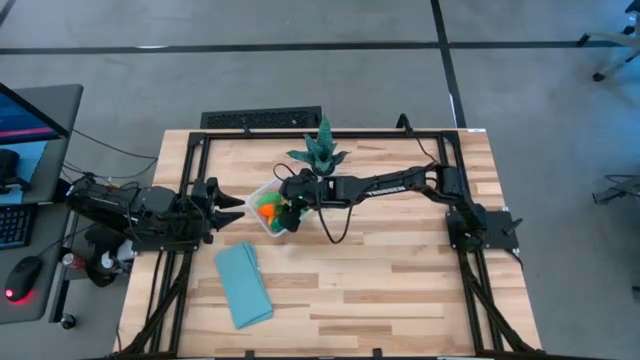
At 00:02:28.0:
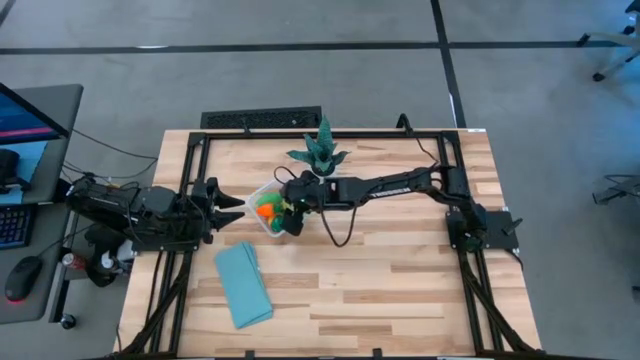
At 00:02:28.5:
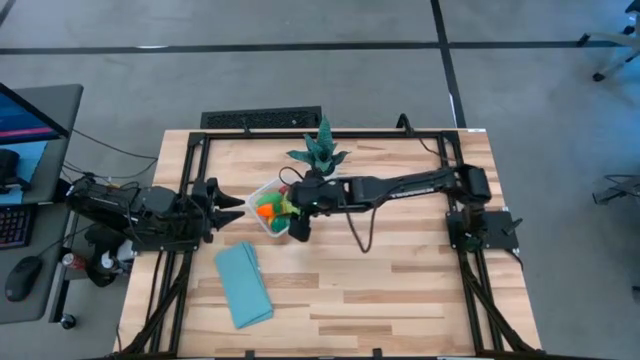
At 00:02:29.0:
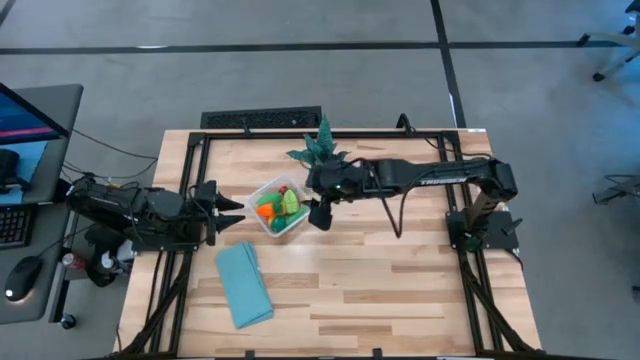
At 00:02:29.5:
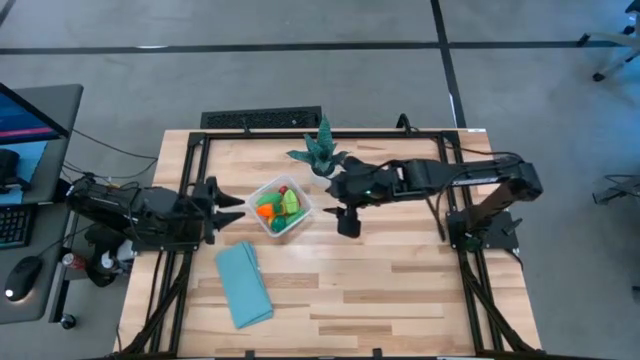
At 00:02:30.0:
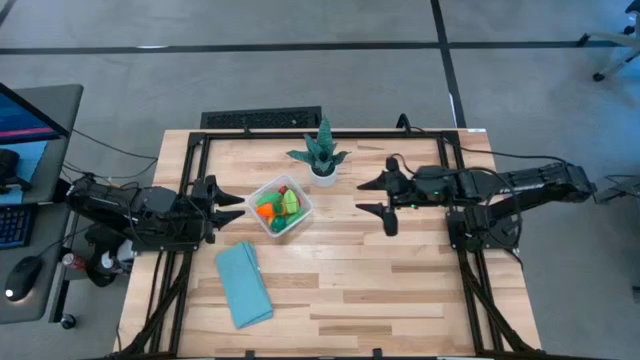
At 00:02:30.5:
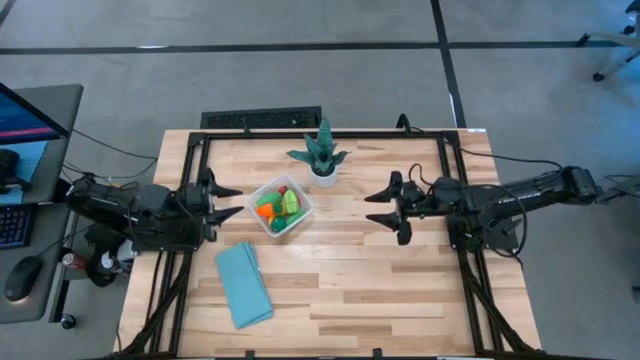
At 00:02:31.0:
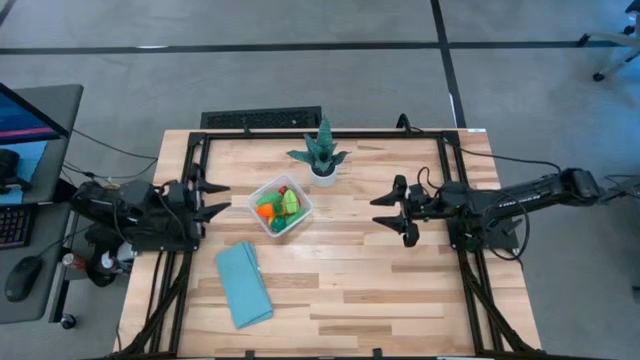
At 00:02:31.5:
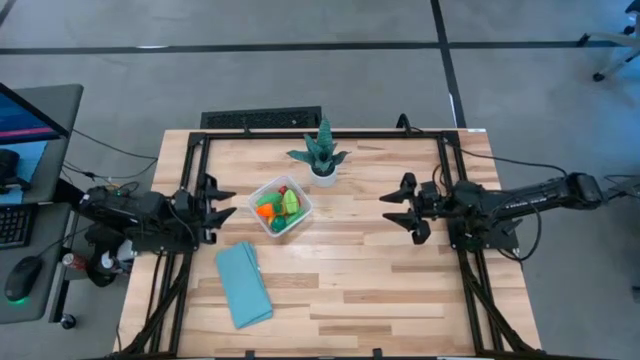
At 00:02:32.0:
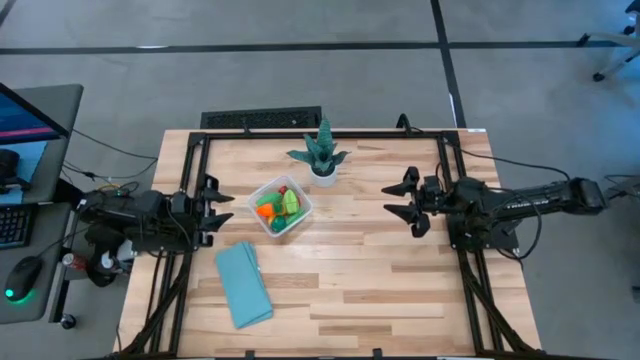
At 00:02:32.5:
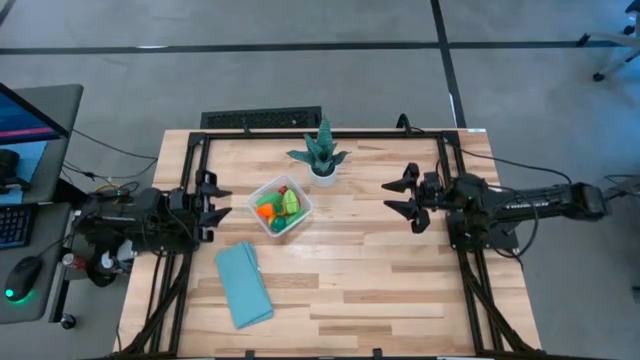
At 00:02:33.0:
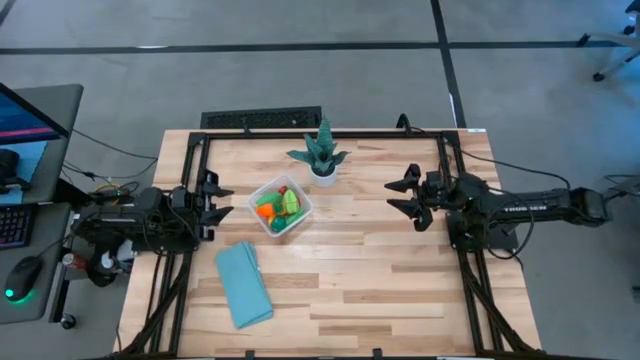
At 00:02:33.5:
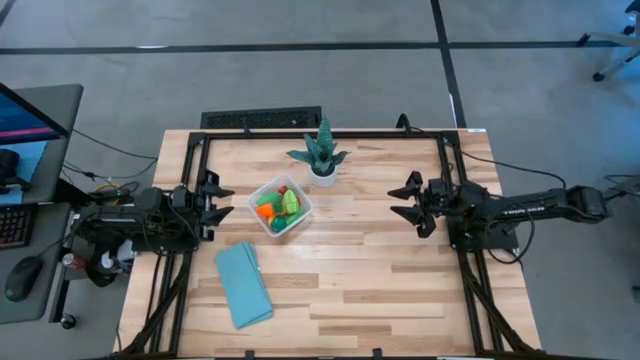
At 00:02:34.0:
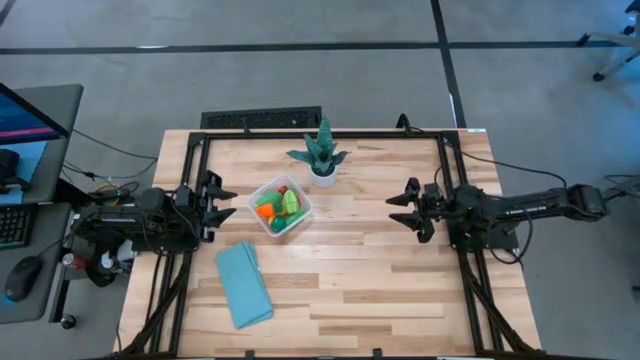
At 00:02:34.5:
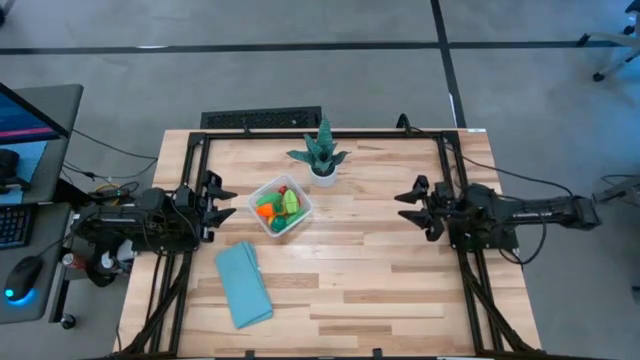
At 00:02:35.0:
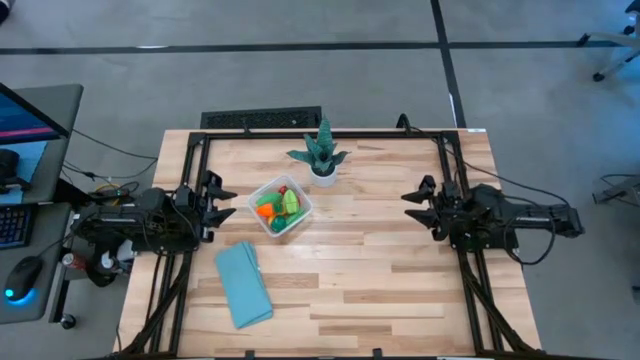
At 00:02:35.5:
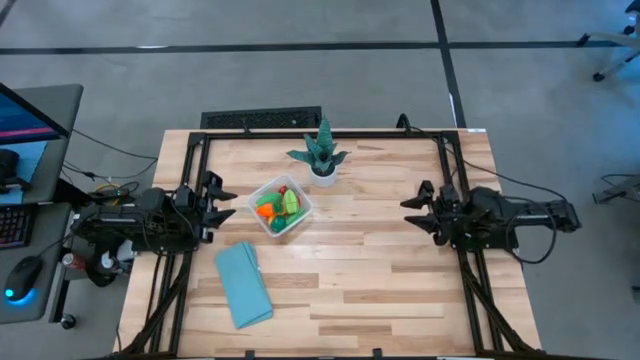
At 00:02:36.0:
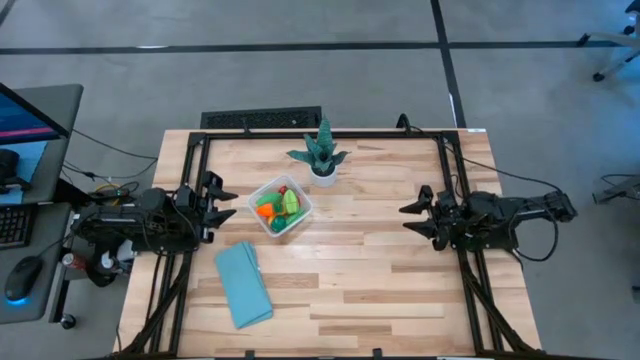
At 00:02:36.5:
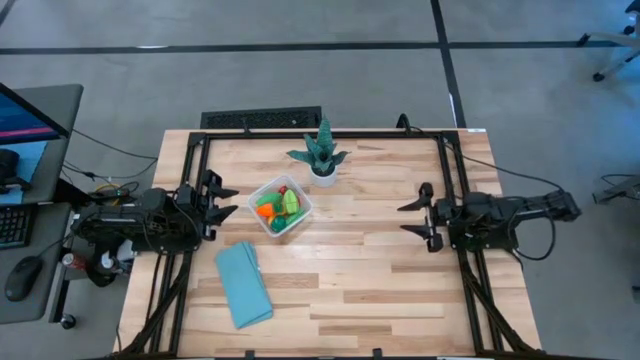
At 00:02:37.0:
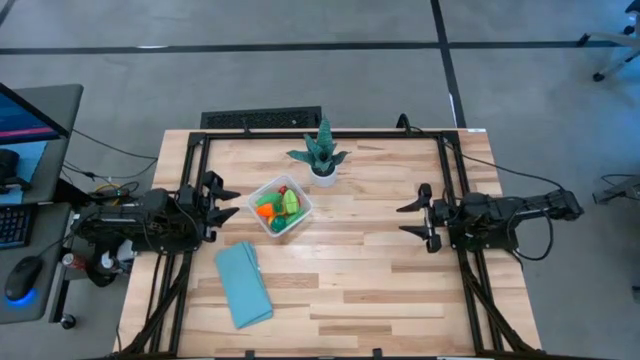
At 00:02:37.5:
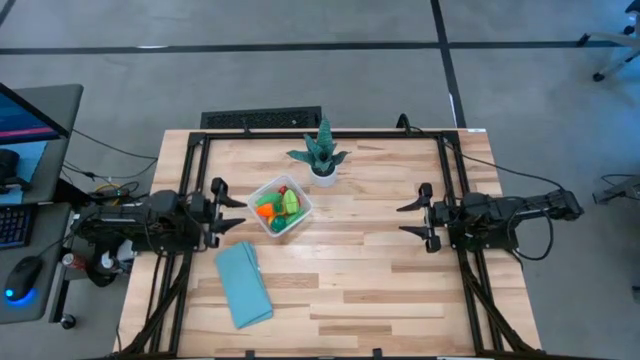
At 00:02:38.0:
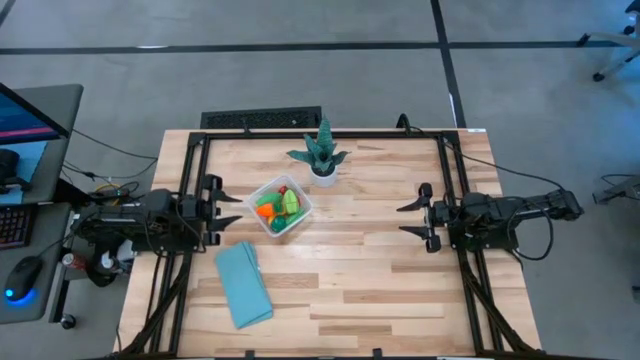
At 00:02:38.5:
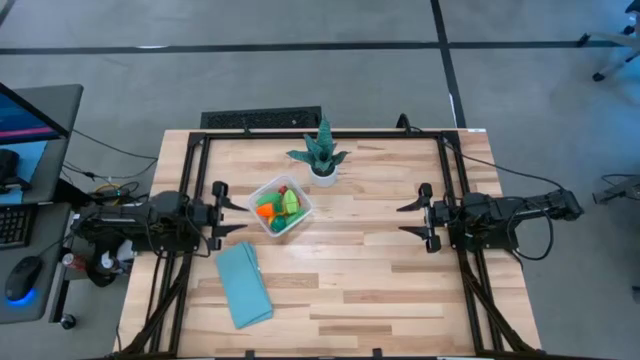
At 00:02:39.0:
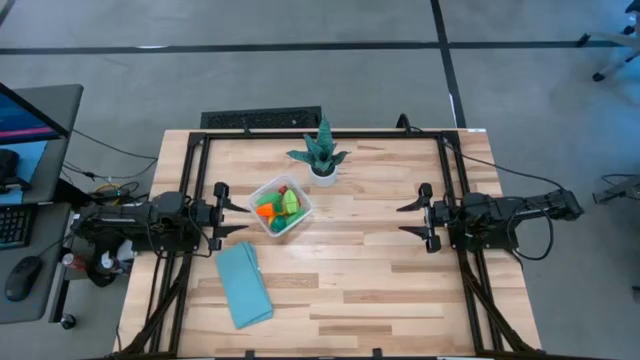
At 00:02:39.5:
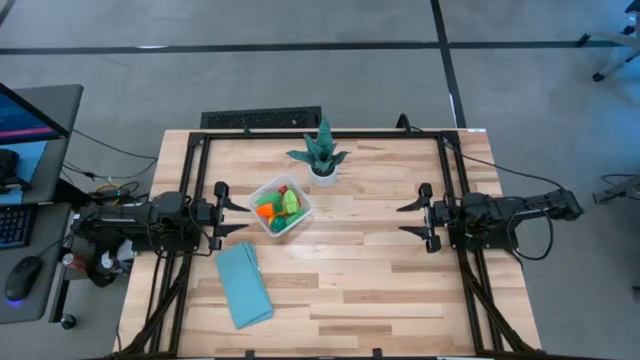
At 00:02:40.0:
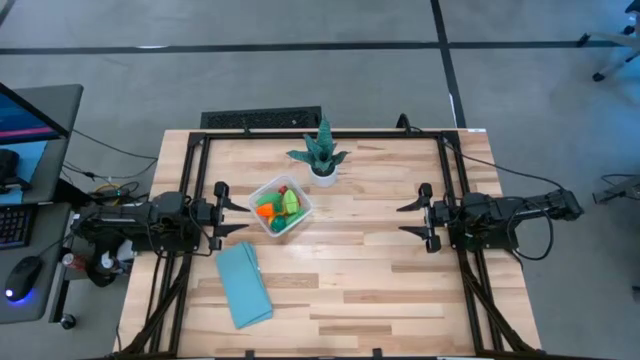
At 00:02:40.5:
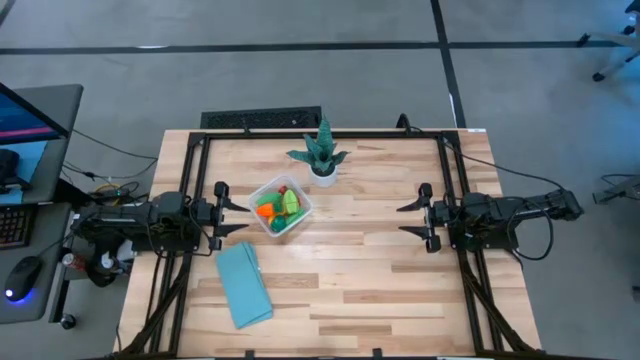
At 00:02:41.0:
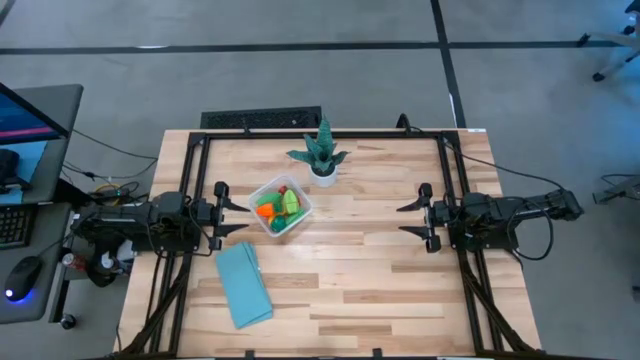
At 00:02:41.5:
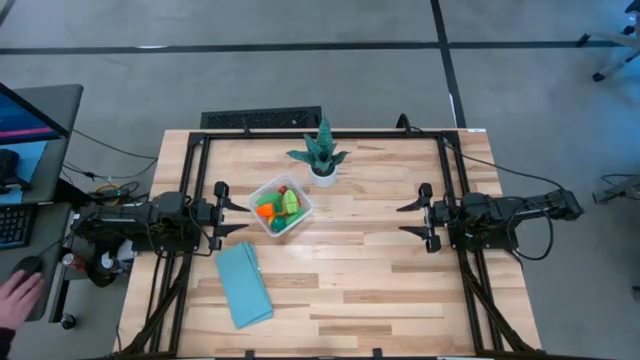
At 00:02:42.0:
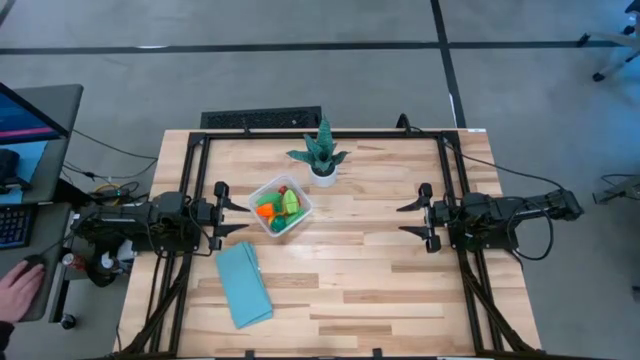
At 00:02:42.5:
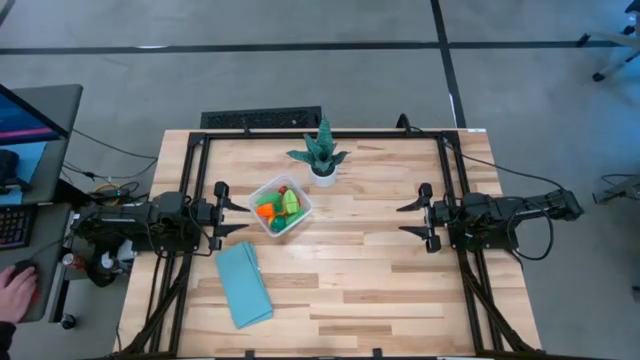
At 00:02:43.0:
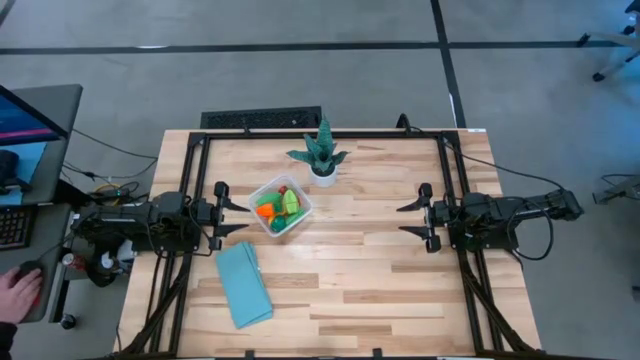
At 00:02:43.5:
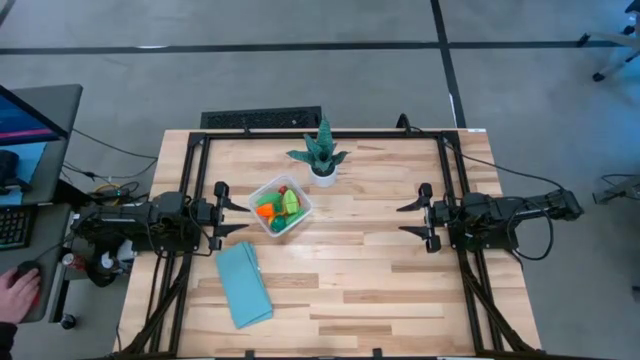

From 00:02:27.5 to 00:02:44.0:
Task: Pick and placing Produce into tupperware
Return to Home Position

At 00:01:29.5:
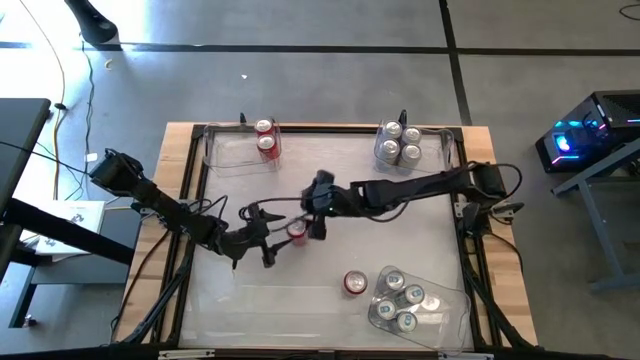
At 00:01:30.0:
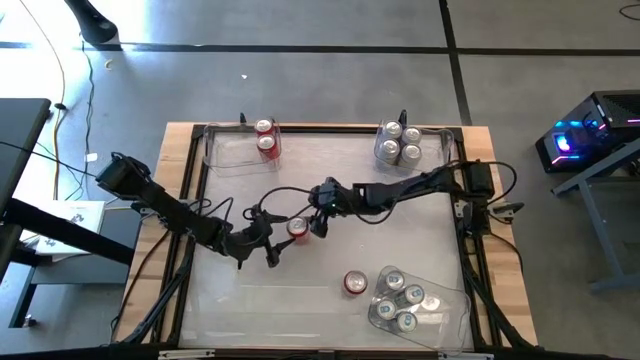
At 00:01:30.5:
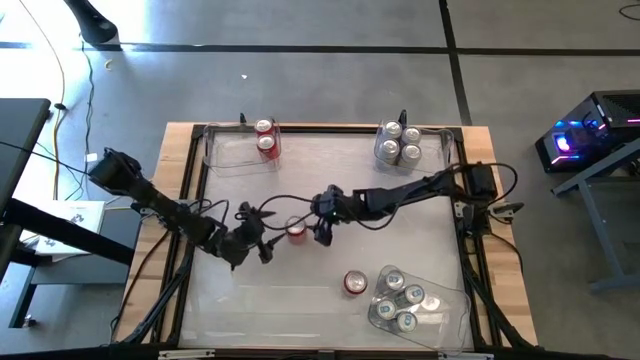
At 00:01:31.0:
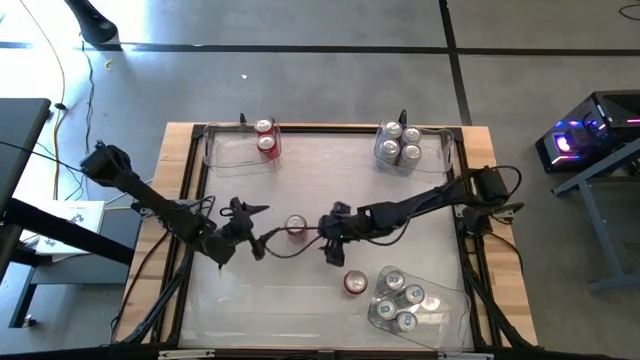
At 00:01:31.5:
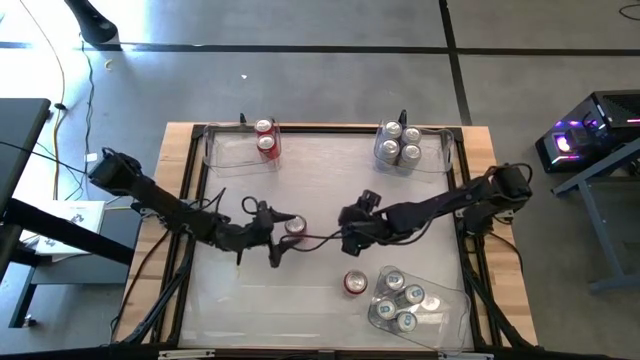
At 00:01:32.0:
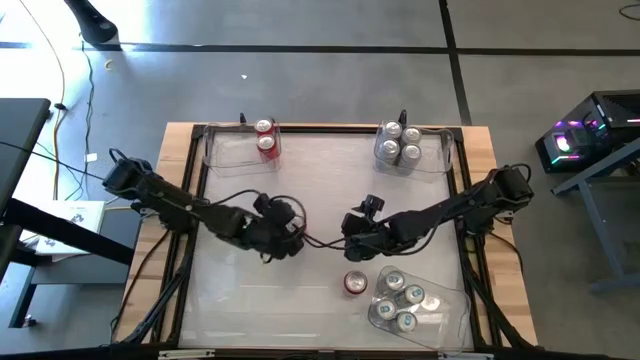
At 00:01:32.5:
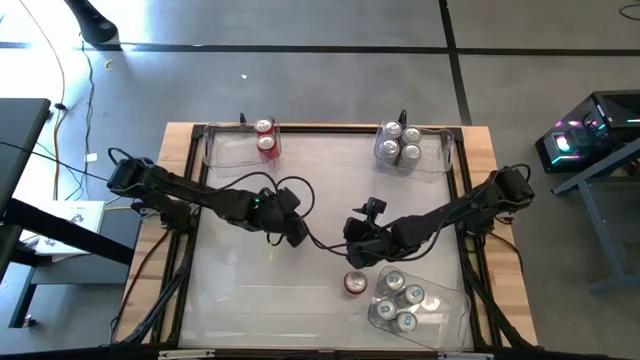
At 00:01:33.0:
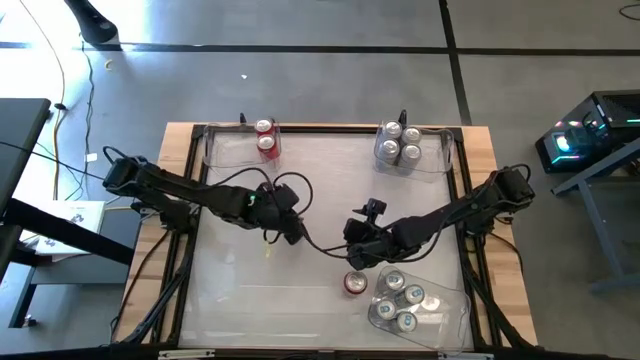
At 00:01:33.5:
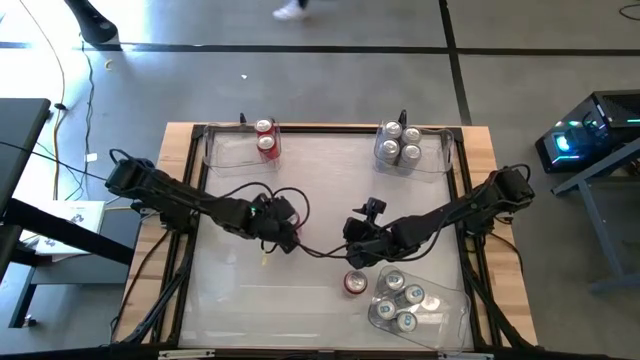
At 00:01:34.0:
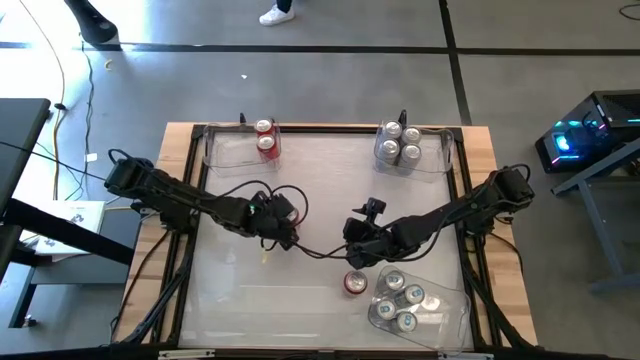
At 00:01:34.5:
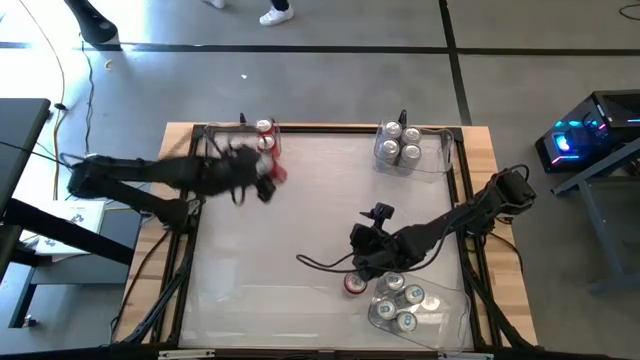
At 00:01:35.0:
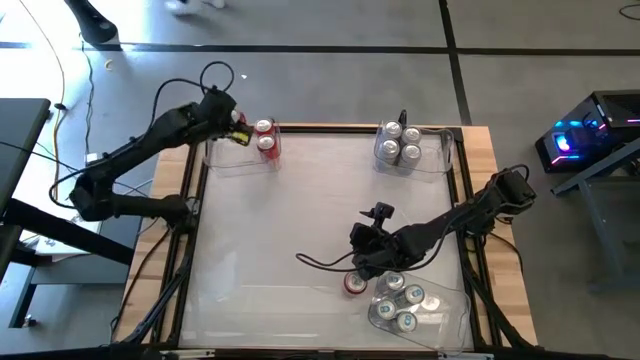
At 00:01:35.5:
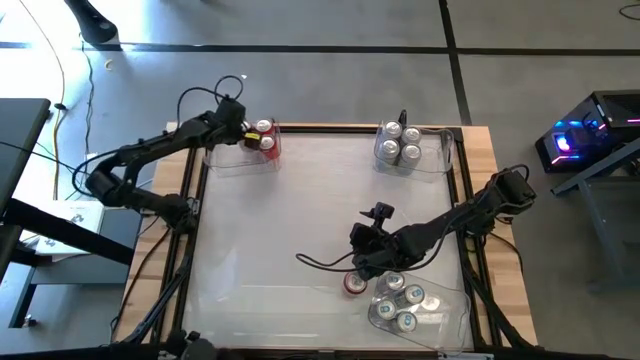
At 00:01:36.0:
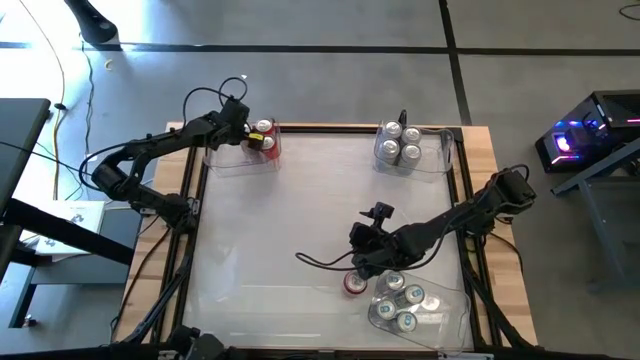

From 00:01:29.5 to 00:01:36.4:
Task: Sort soda cans
Put the red soda can into the top left transparent bin
